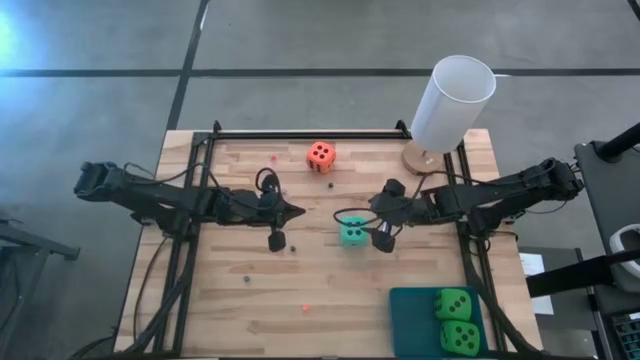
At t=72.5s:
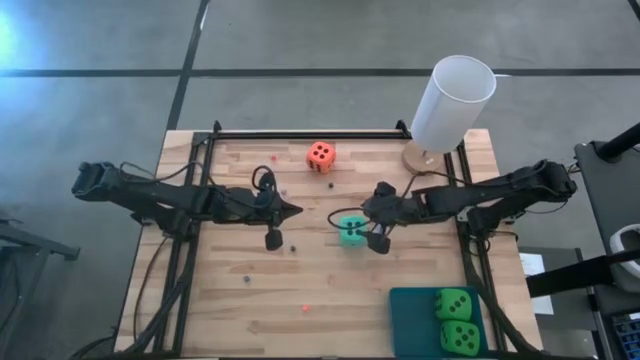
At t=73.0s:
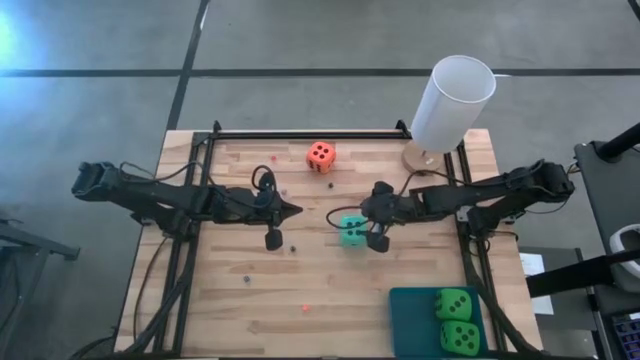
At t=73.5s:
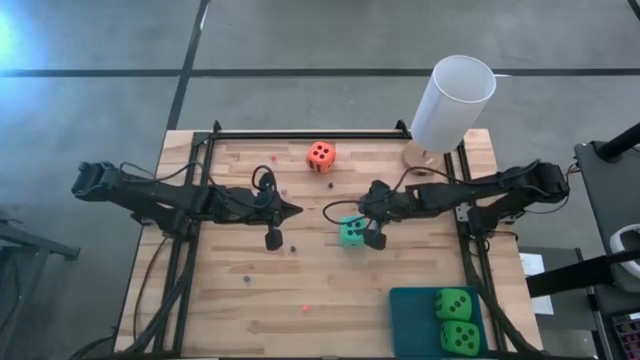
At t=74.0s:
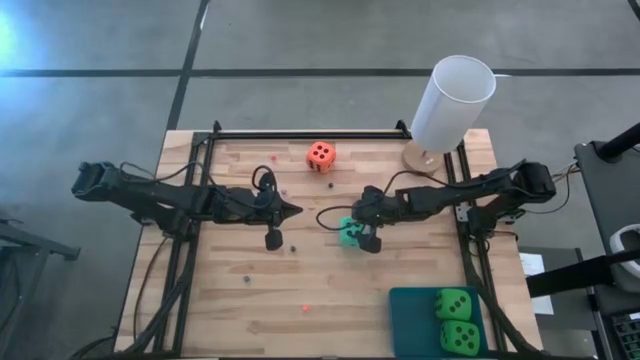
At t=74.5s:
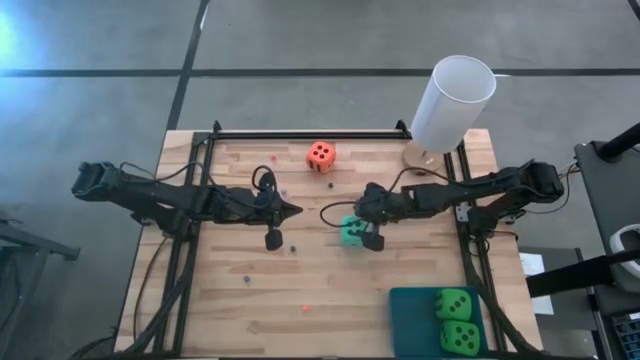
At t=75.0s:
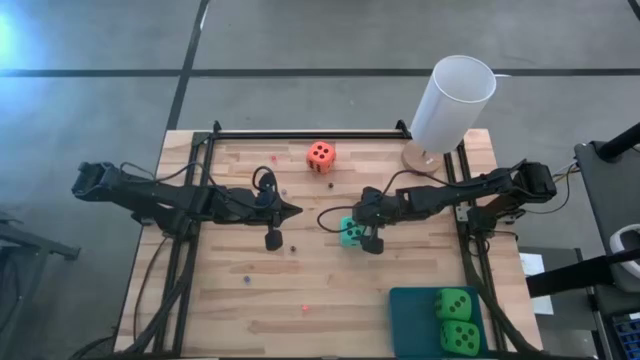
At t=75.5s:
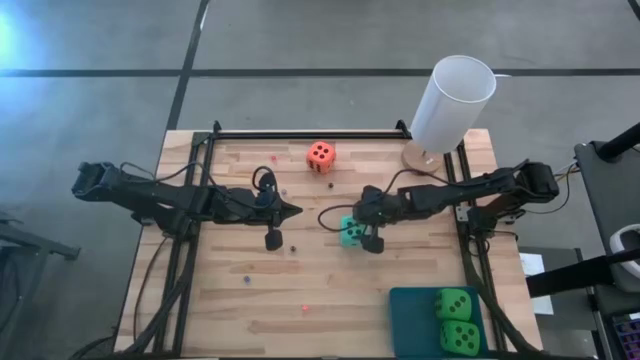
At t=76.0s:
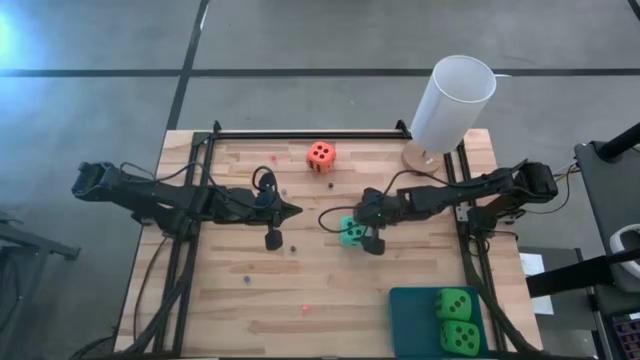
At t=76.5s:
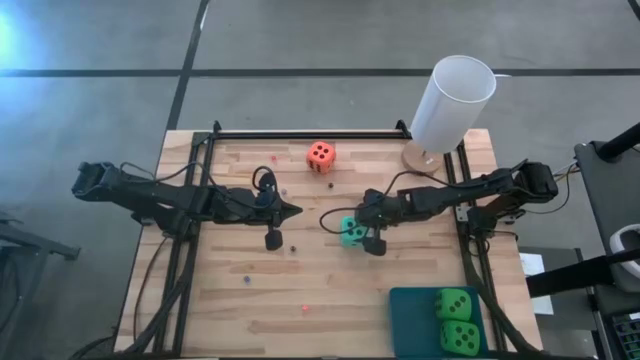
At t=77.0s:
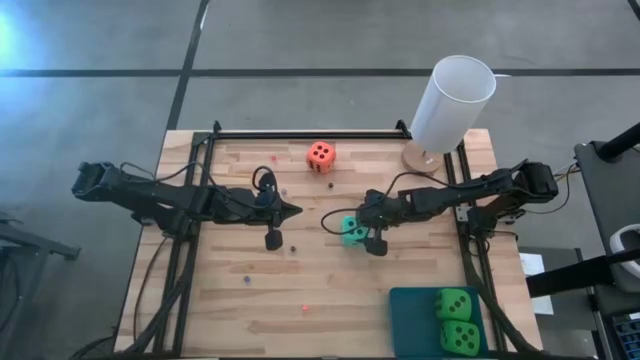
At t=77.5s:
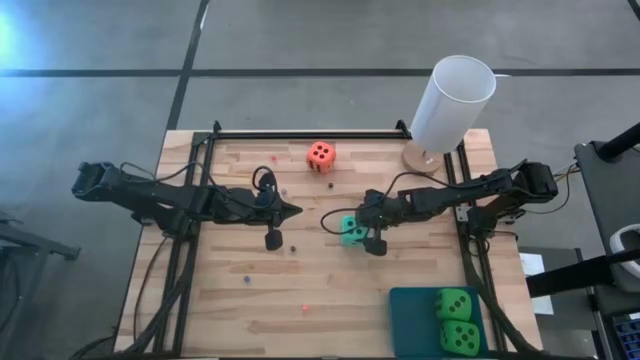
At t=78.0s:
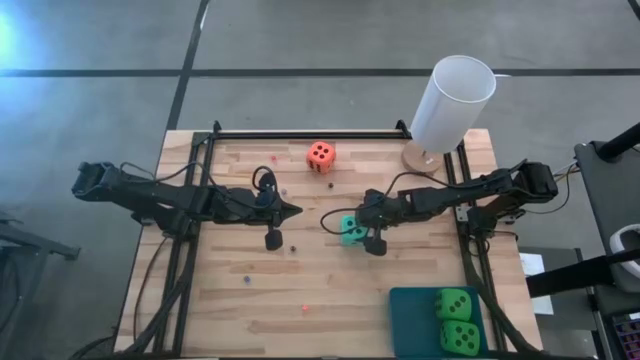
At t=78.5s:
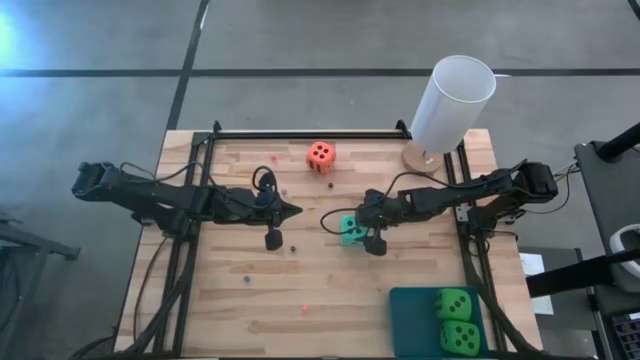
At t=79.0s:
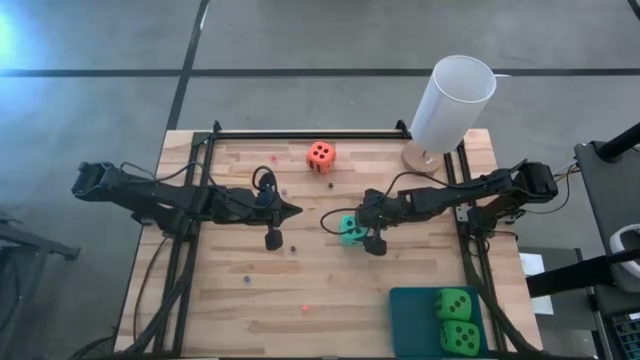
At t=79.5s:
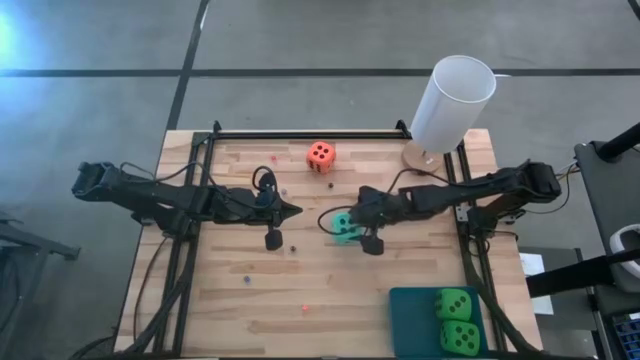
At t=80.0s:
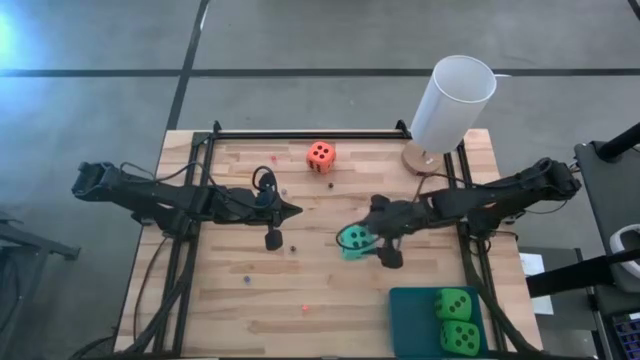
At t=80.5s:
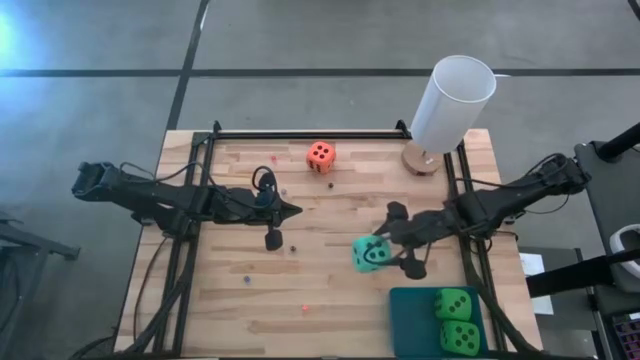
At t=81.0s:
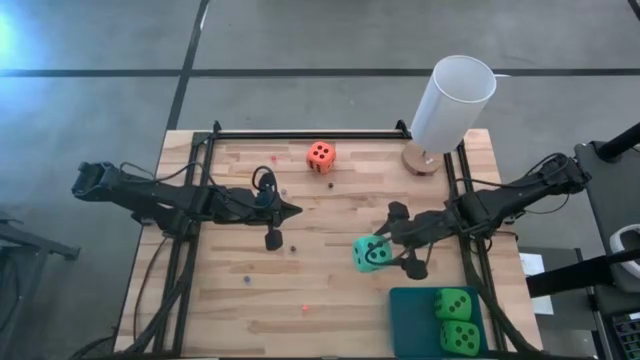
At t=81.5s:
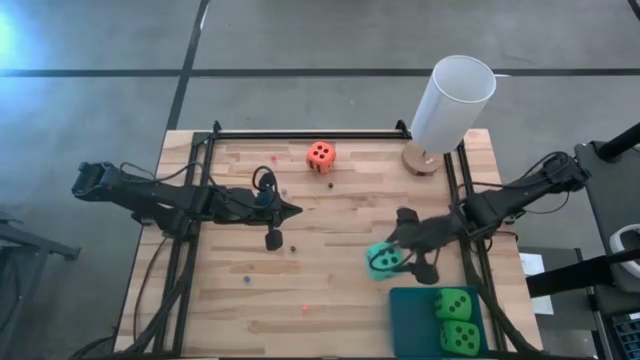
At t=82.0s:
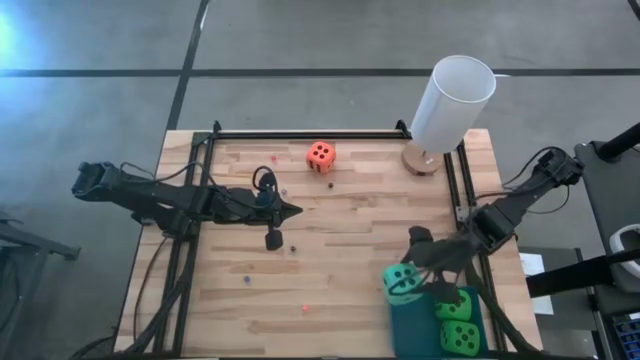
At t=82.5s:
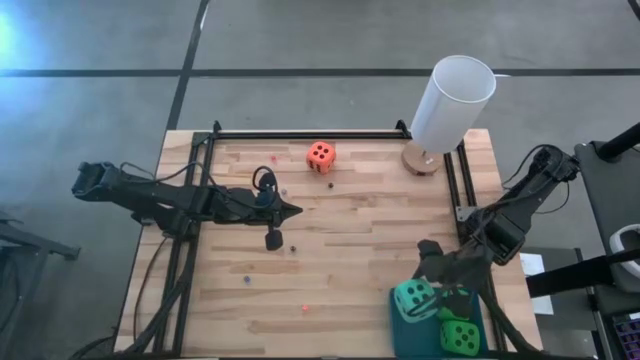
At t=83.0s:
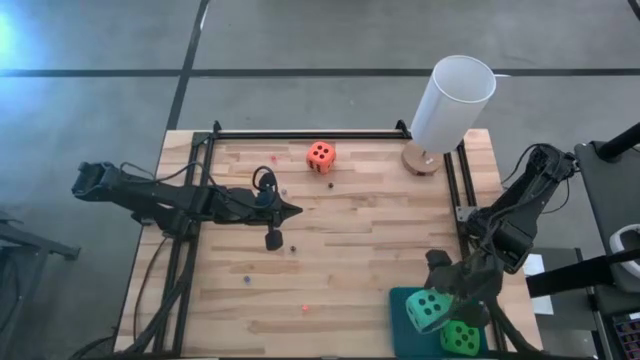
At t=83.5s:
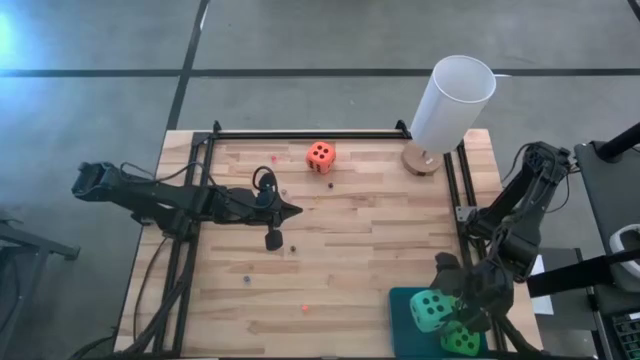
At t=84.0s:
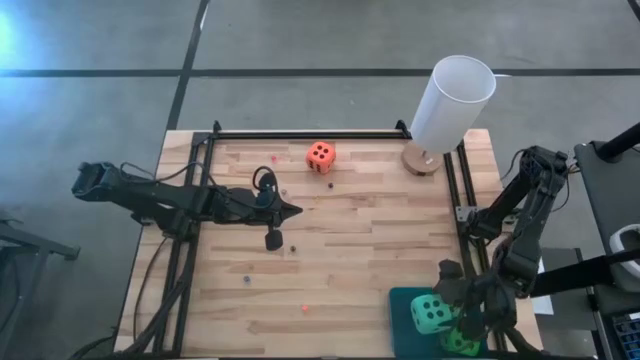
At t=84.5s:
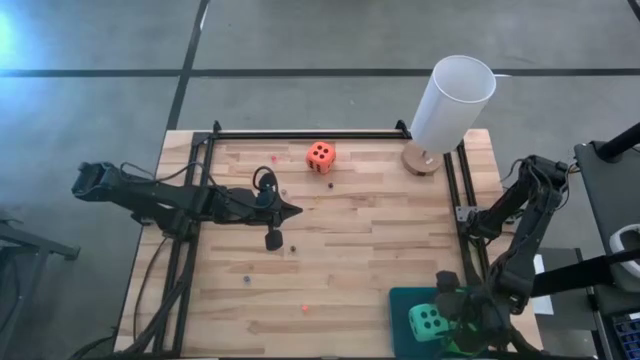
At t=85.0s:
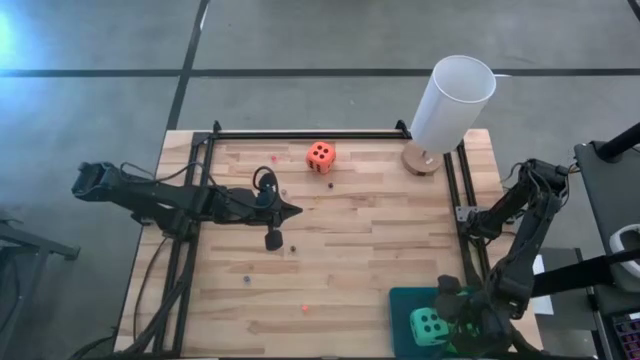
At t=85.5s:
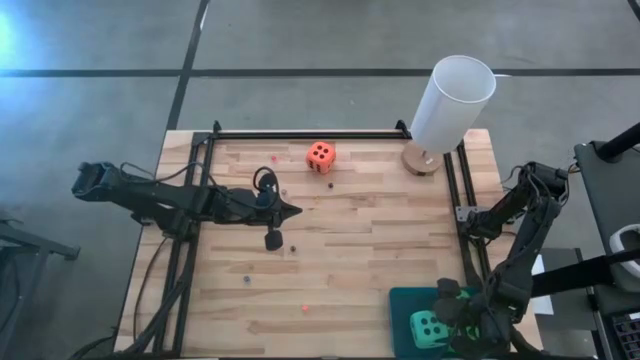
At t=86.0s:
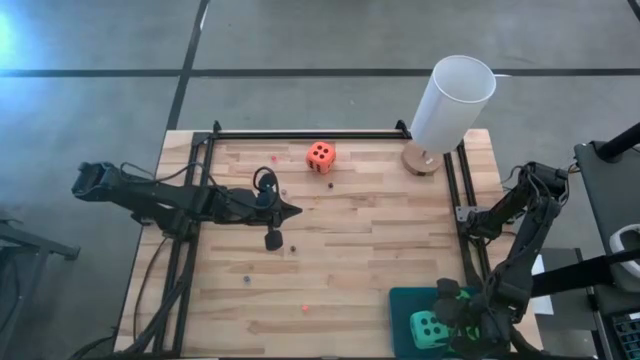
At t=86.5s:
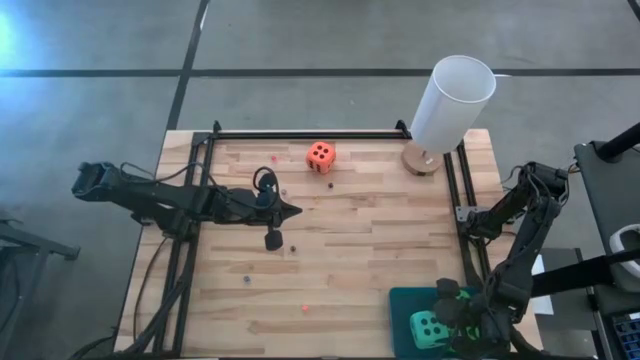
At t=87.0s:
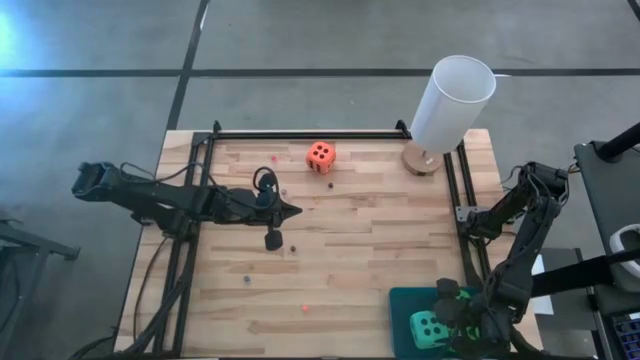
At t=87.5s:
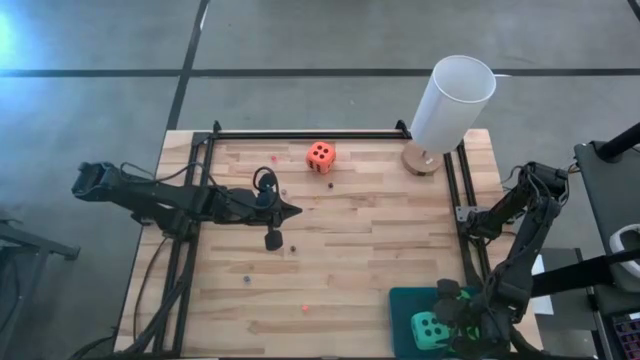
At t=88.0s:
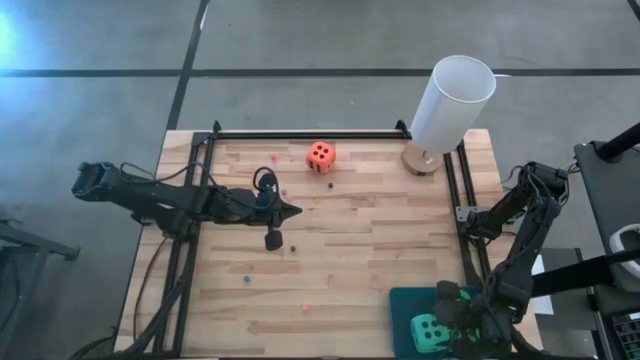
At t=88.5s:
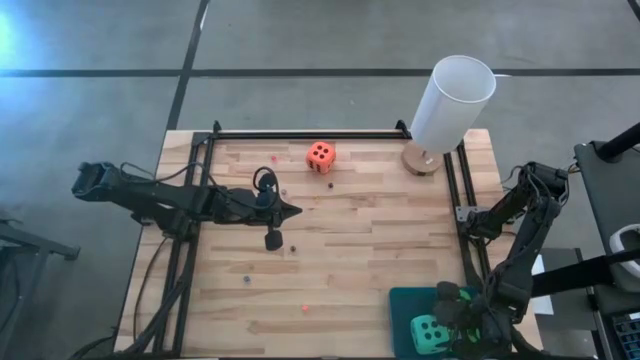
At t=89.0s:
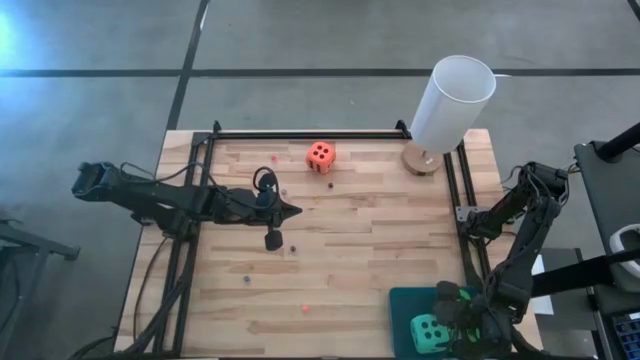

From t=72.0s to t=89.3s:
Task: Pick & Place Dice
Put the large blue die into the blue bin

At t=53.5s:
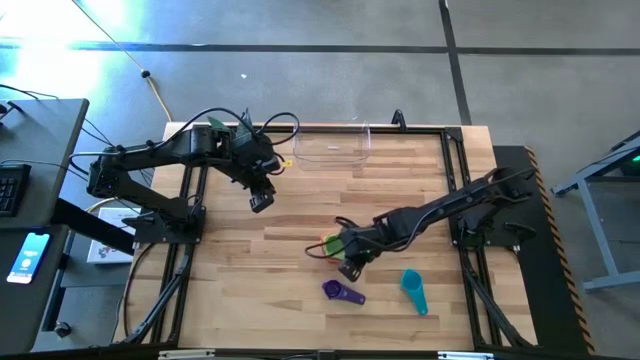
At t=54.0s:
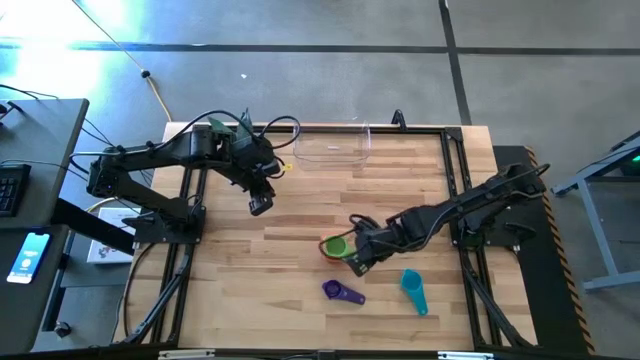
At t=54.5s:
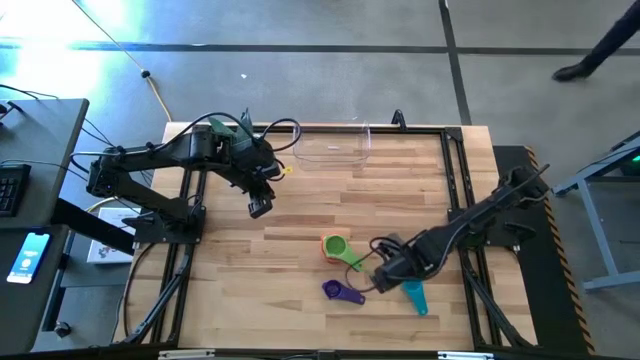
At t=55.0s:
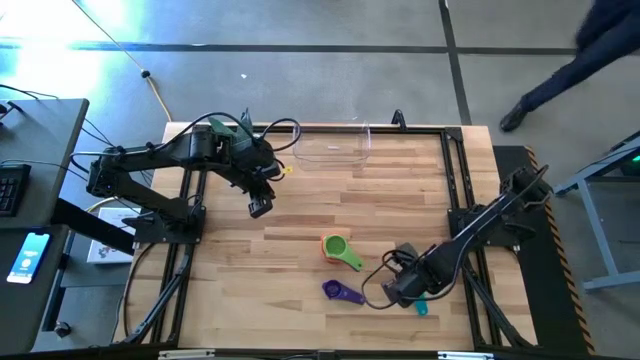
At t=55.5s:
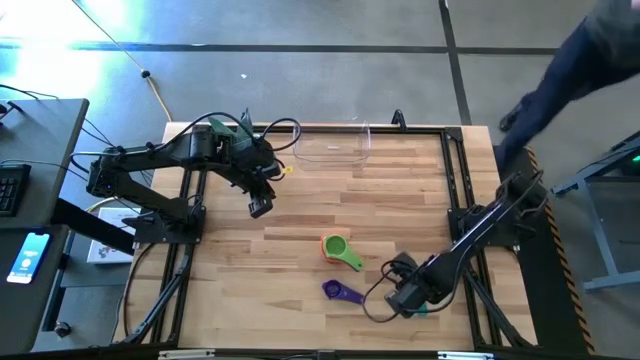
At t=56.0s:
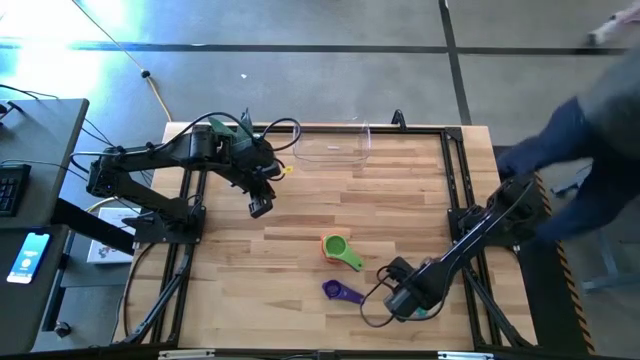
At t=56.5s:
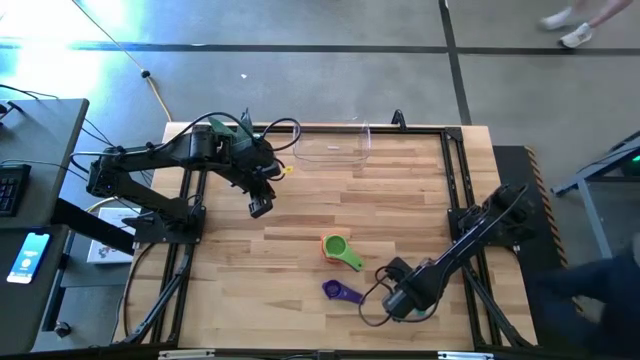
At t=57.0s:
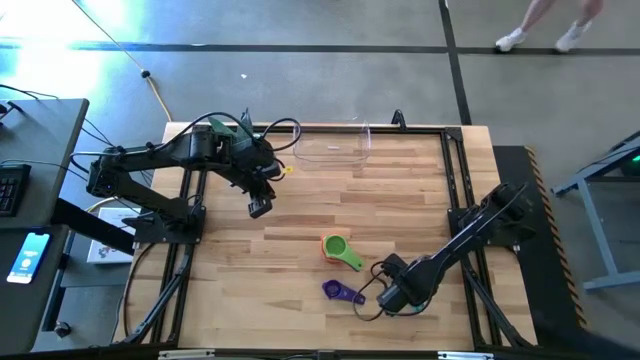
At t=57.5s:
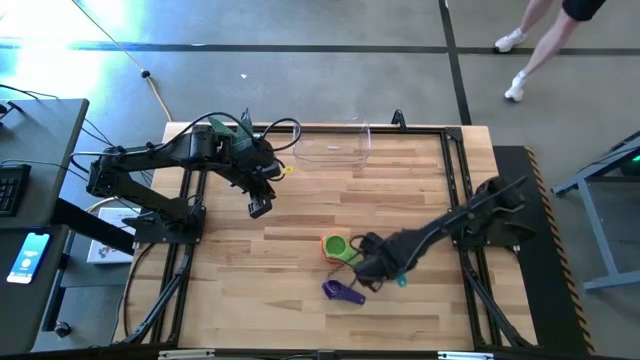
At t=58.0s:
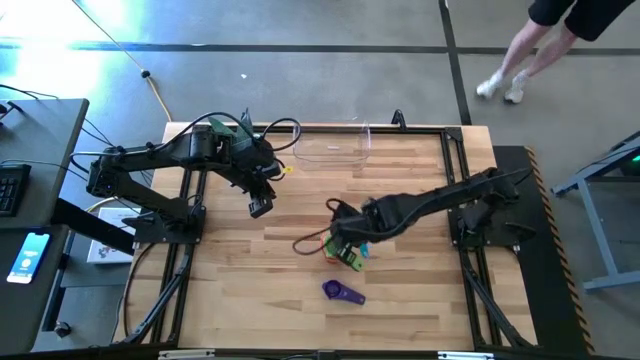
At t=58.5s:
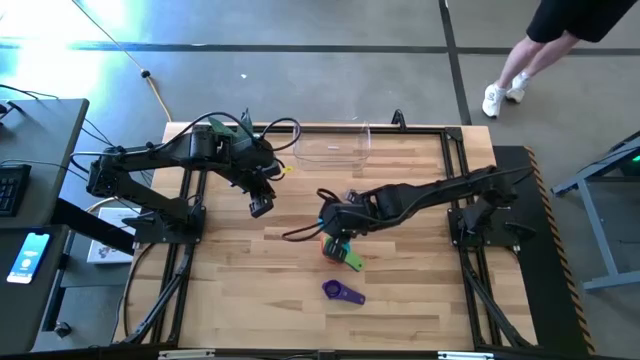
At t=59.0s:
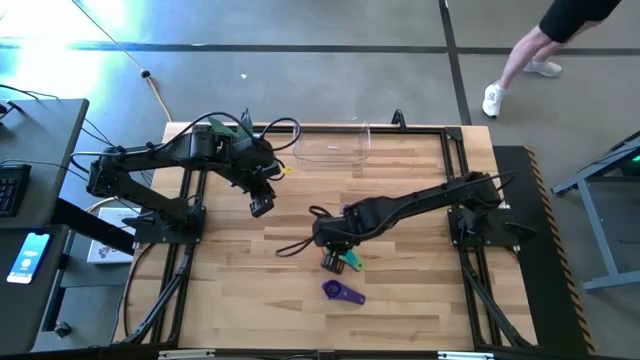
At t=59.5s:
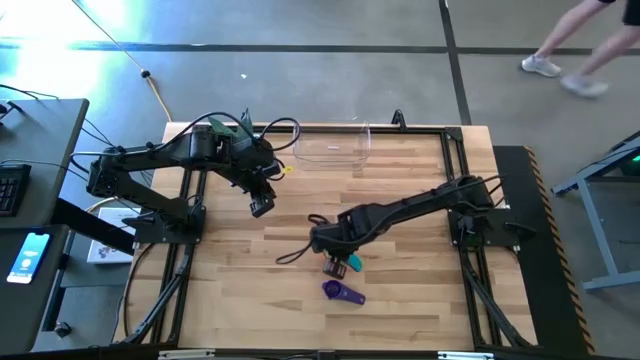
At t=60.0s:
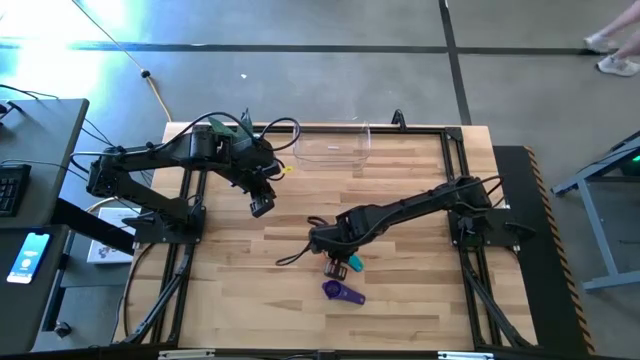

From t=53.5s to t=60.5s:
Task: Nest measuring cups in basket
Stack the light blue measuring cup on top of the green measuring cup
